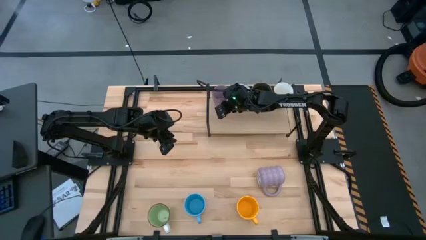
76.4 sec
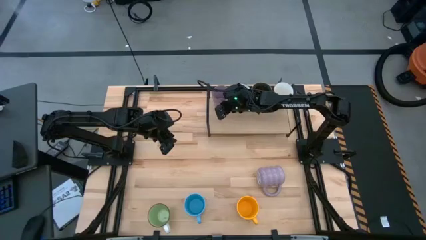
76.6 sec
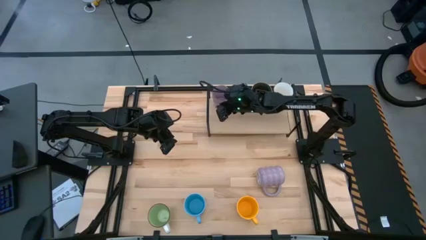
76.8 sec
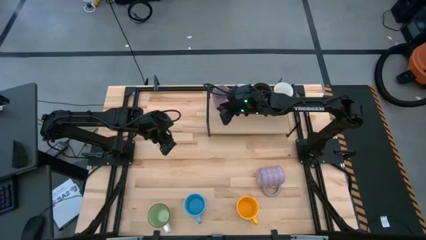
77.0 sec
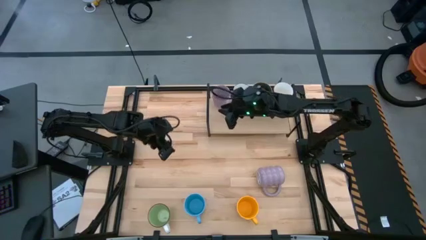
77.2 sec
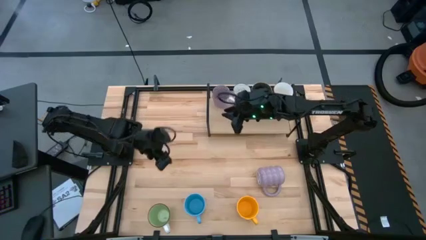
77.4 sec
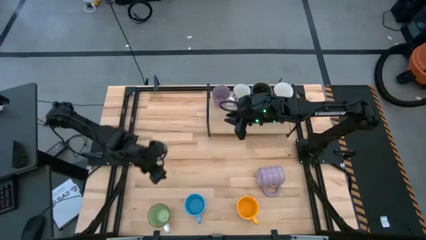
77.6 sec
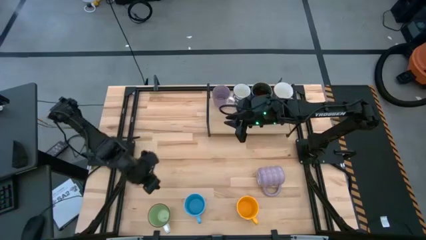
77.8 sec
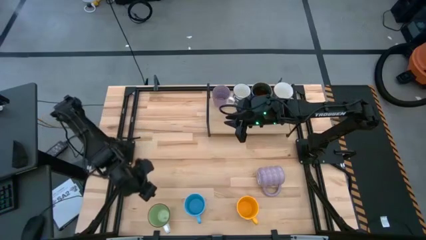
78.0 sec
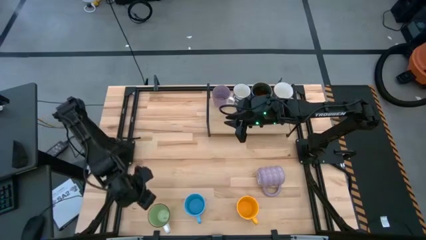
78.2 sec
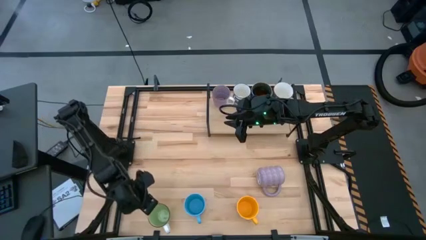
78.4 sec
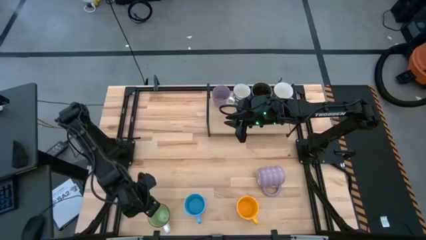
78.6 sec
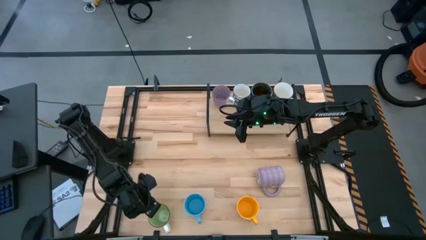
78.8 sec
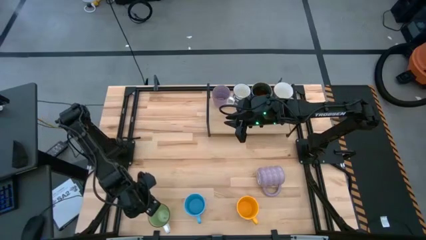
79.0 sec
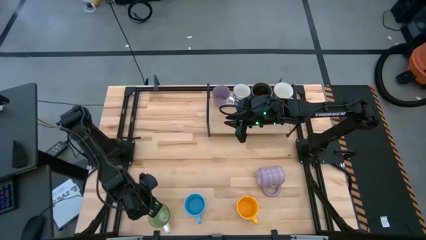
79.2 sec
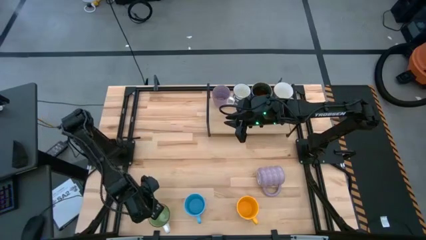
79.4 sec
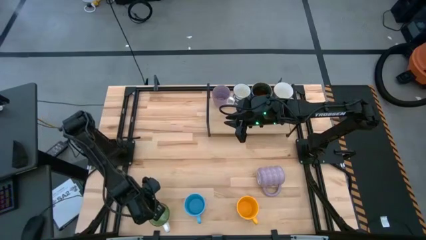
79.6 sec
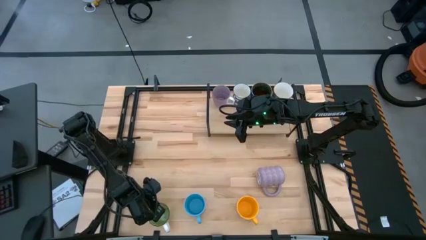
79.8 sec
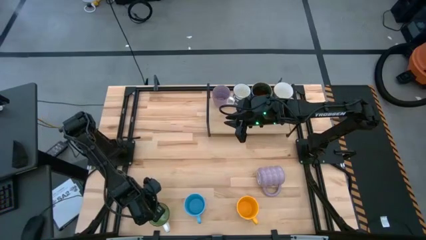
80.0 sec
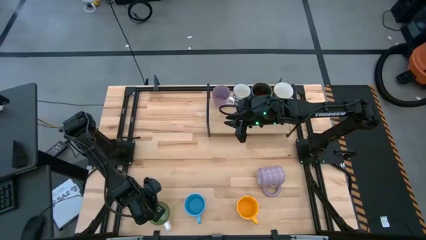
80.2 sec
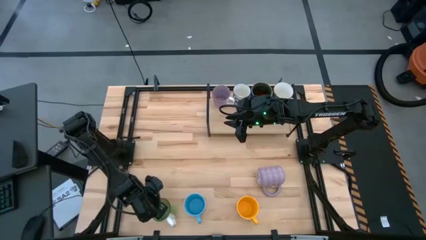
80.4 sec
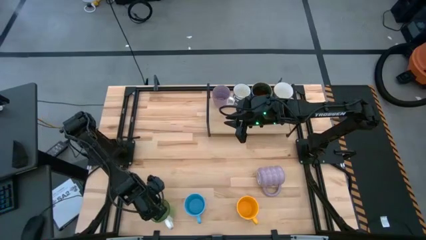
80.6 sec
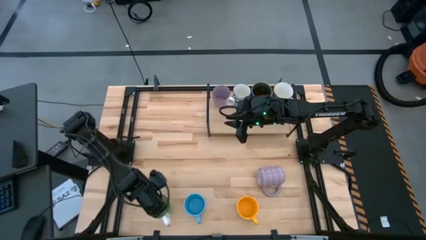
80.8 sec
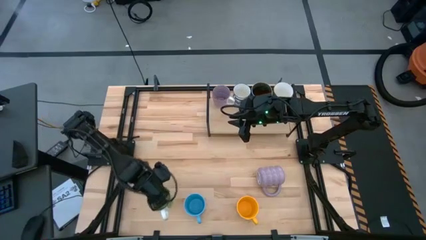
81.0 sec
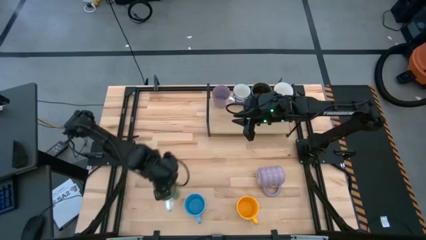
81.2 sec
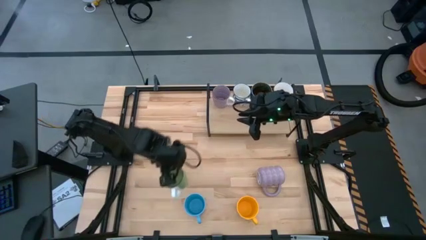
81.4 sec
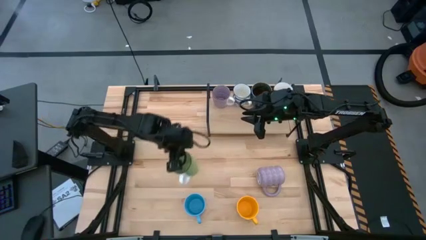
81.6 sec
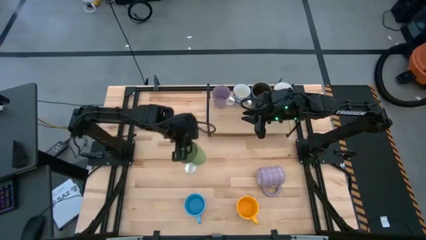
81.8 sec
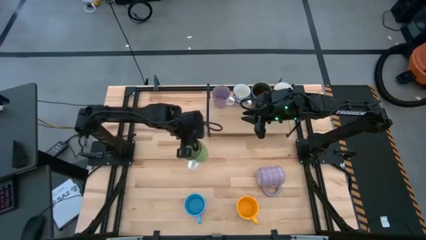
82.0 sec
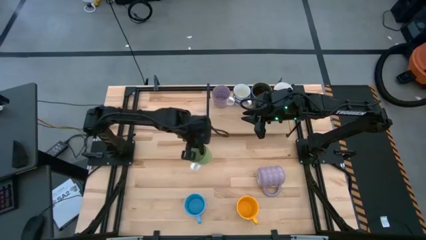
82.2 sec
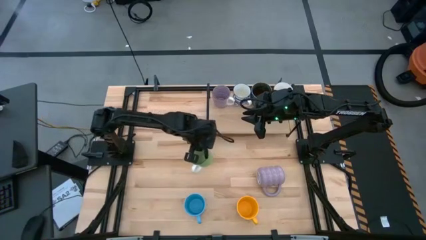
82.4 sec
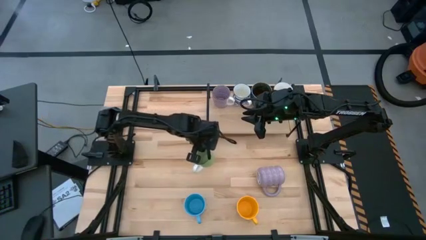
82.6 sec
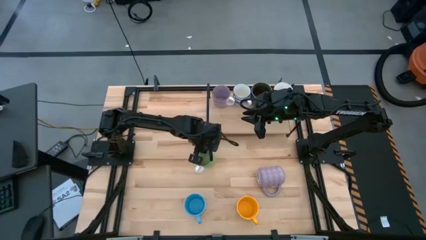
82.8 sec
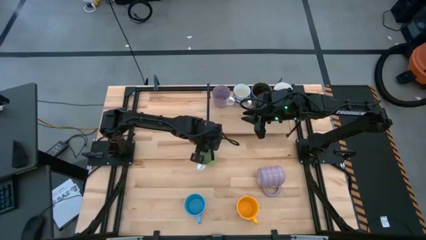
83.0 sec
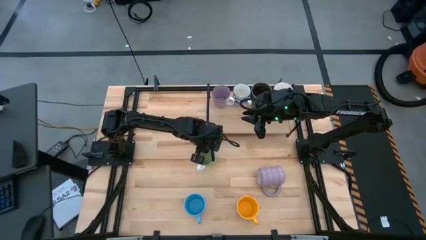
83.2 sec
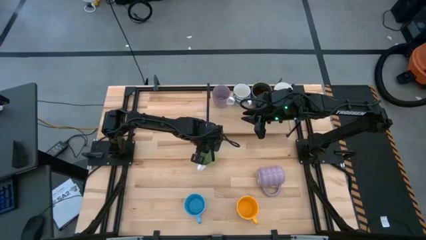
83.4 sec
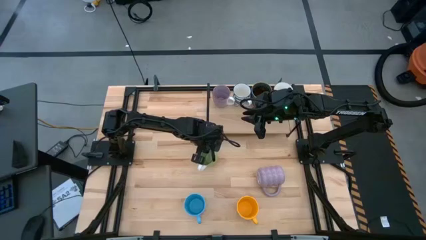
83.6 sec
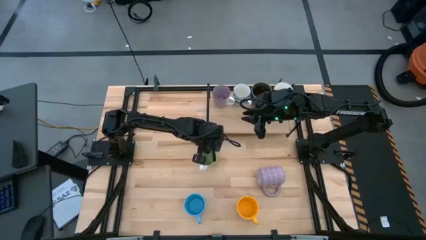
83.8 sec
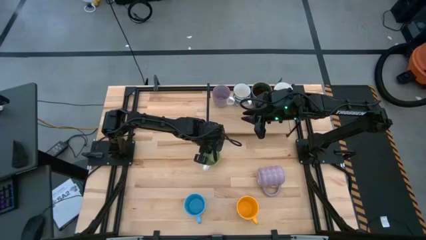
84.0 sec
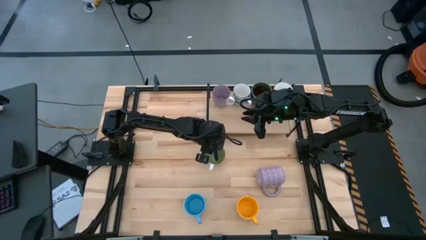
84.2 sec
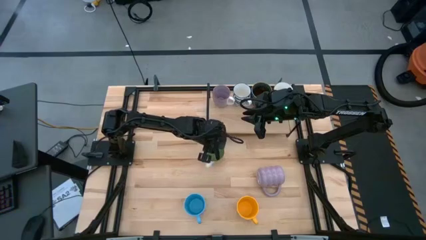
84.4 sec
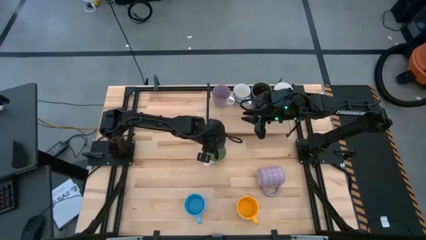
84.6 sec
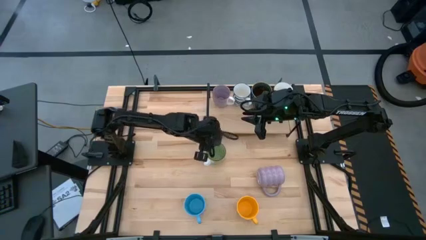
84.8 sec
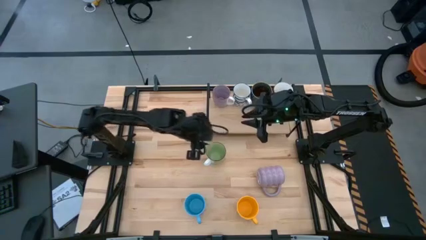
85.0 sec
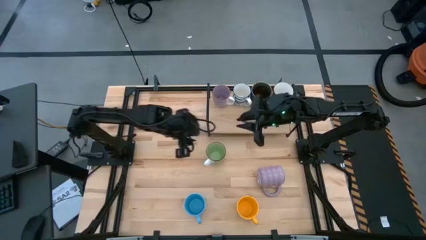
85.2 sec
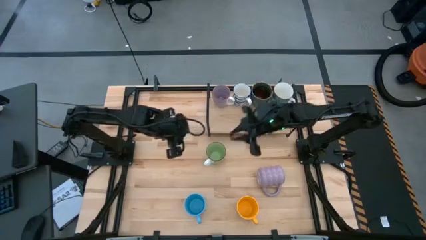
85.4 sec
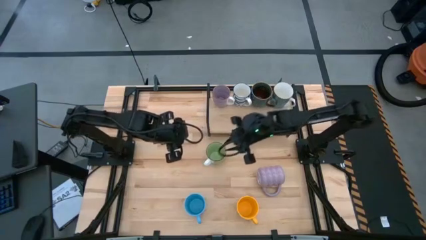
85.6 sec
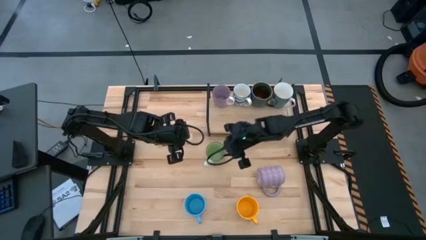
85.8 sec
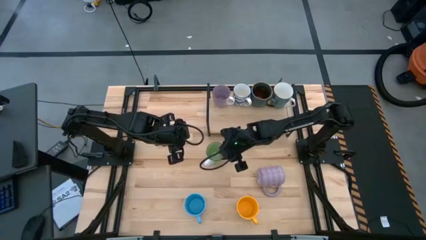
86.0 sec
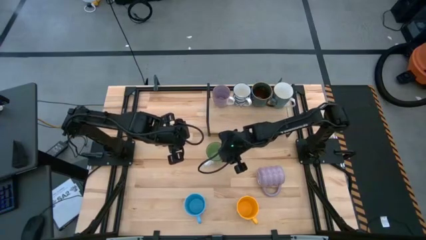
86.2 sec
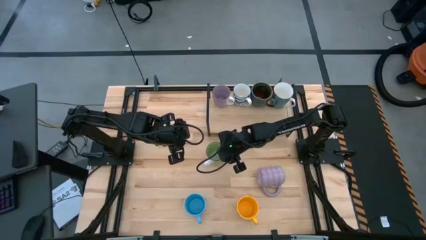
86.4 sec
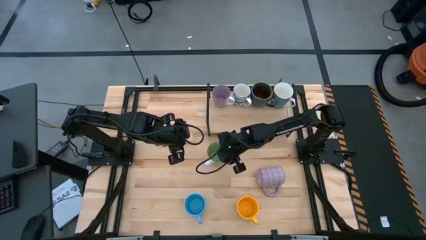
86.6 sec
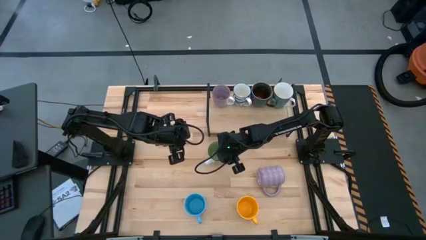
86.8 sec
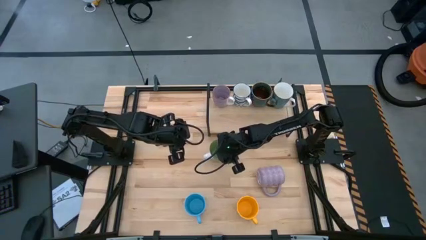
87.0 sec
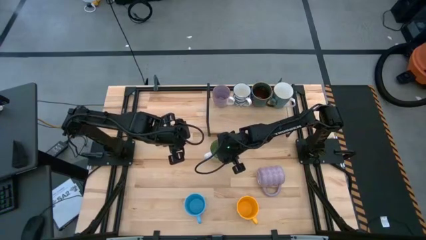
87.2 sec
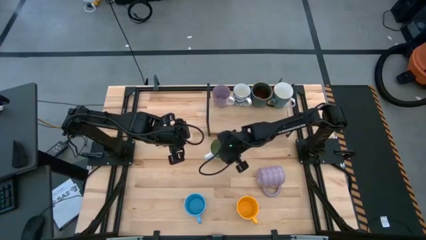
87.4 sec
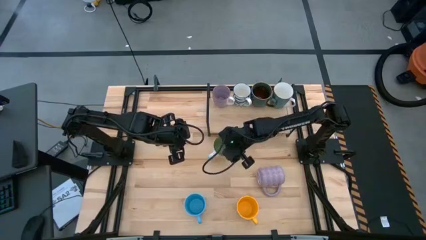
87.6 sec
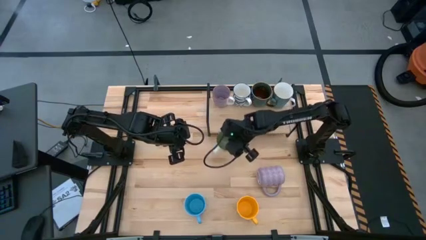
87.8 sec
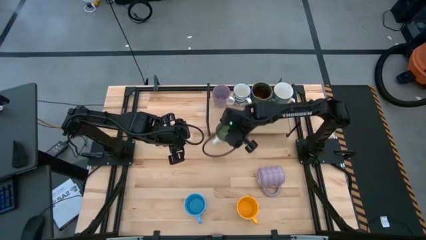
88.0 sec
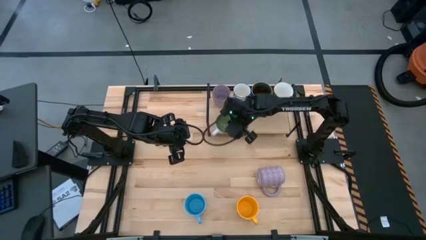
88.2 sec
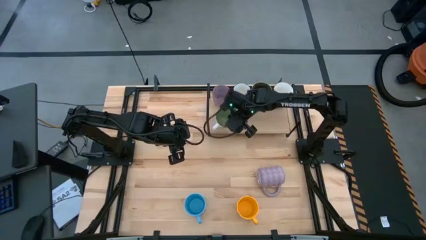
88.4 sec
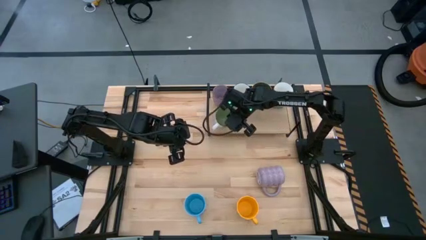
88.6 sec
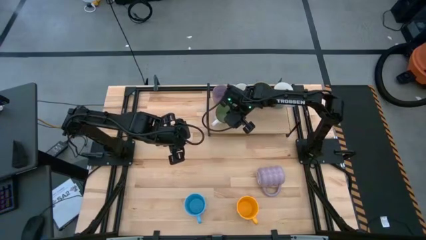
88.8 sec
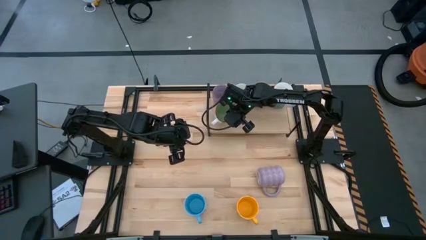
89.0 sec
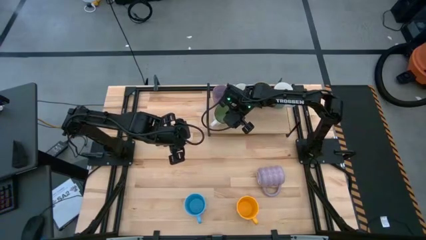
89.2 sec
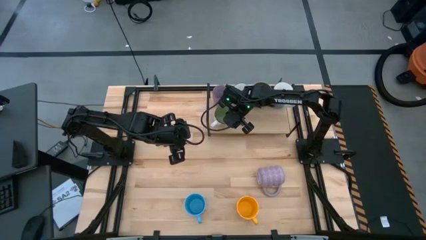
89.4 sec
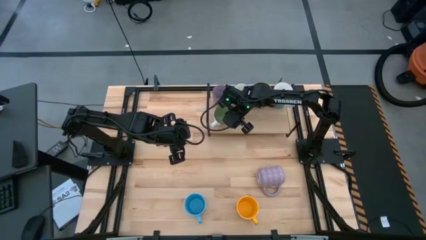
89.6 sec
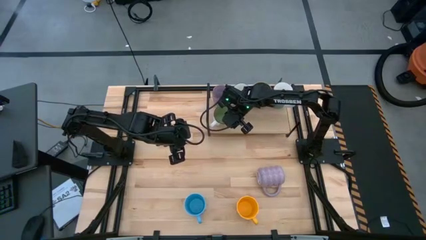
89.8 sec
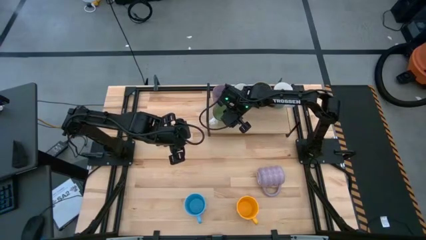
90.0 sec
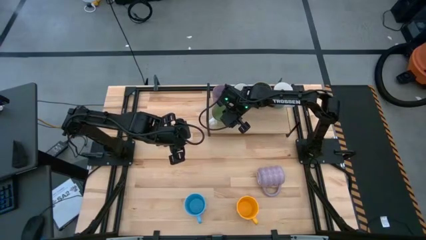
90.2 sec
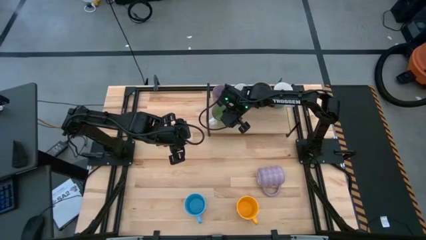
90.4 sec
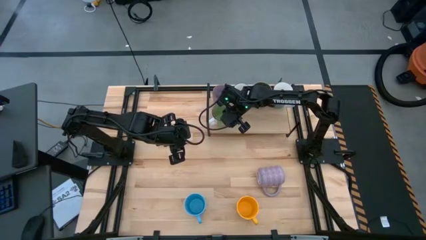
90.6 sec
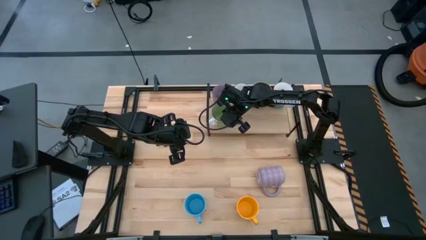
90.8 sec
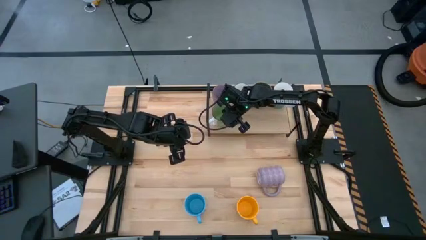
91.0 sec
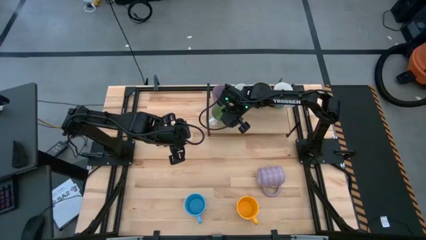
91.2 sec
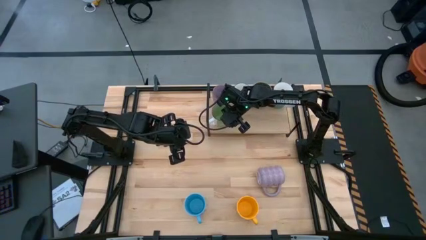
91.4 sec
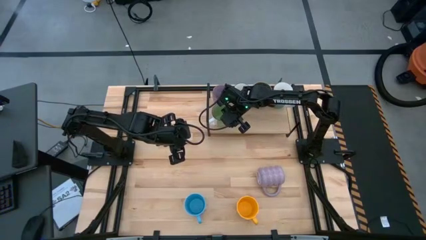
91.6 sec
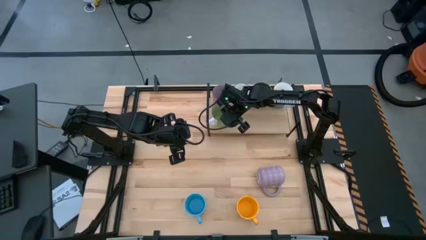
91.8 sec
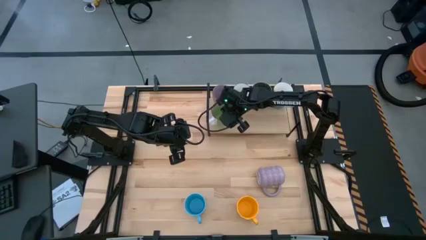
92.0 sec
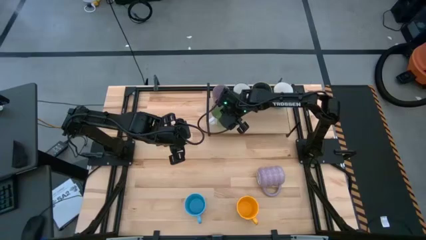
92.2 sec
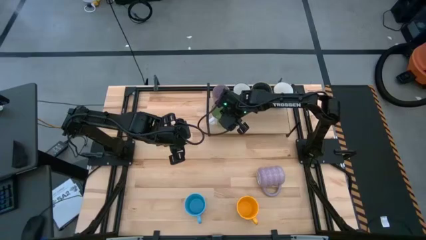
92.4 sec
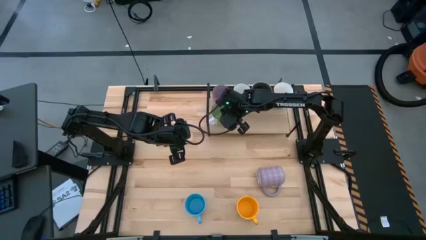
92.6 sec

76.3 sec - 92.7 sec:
Task: Place coffee mugs
Put the green mug on the shelf

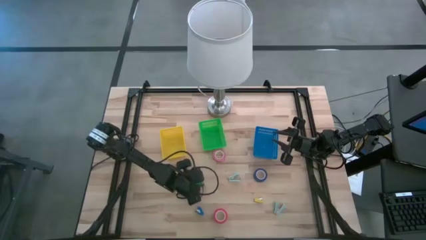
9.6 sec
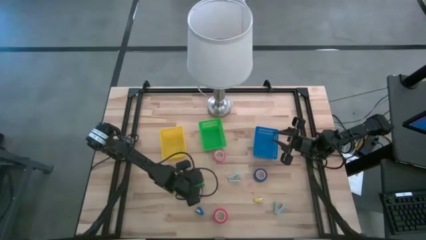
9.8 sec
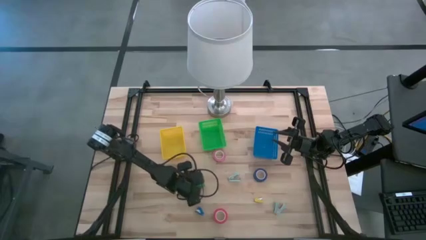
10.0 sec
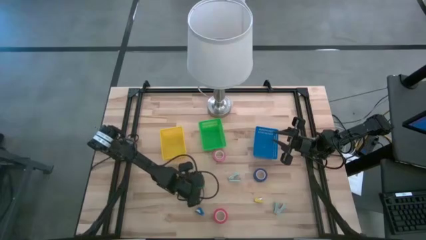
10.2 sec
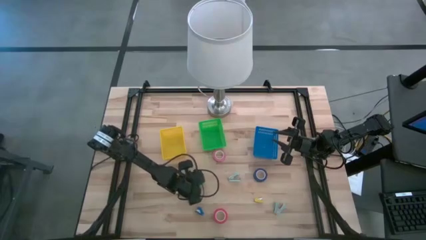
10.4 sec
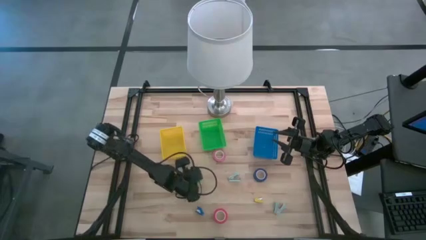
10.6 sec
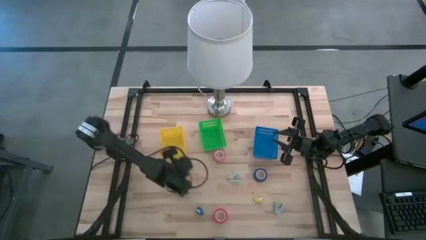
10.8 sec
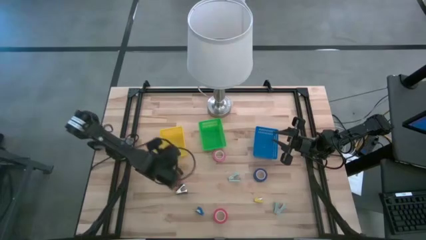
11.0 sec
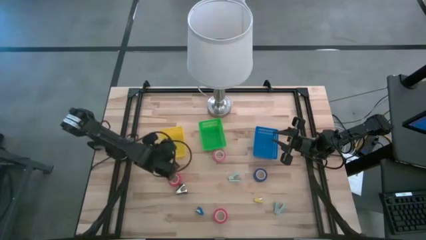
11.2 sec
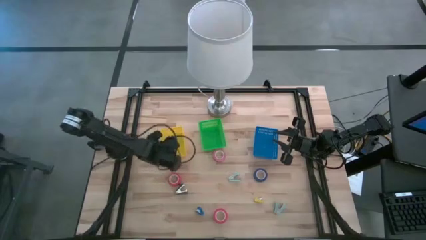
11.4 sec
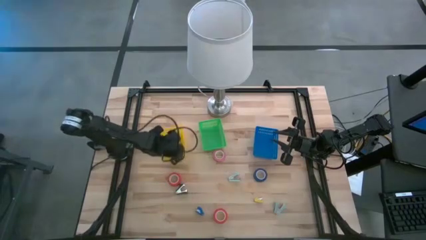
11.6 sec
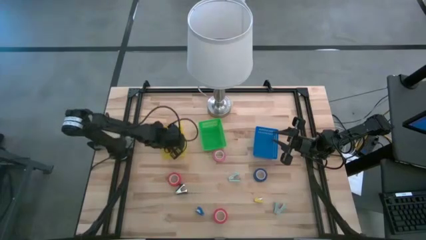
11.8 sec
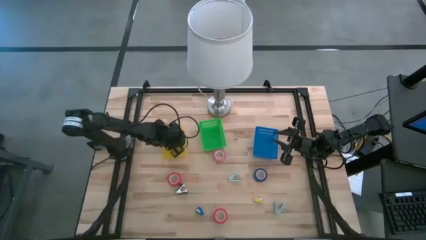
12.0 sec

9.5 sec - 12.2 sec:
Task: Pick and place Stapler, Stapler remover, tape
Put the green stapler into the yellow bin
